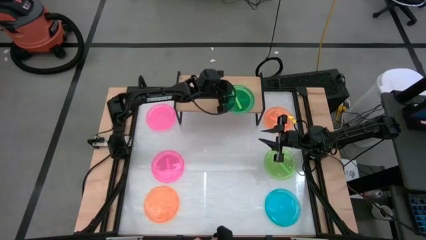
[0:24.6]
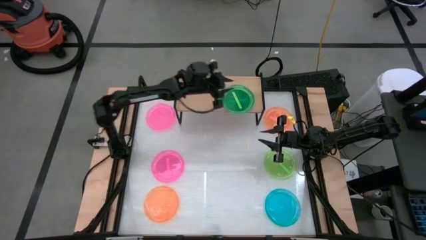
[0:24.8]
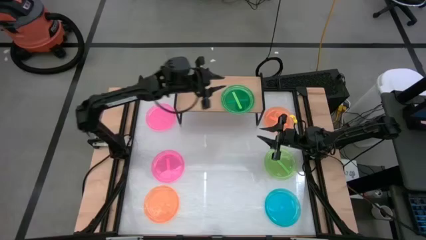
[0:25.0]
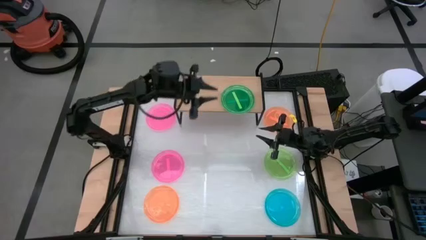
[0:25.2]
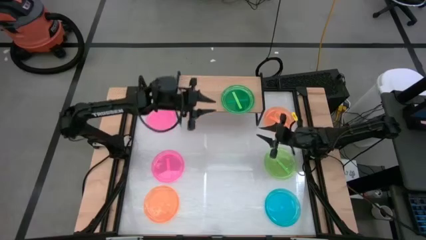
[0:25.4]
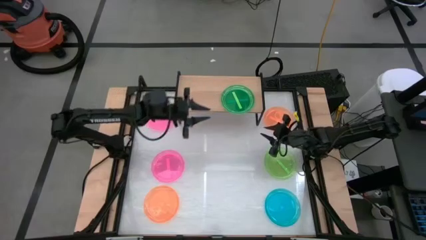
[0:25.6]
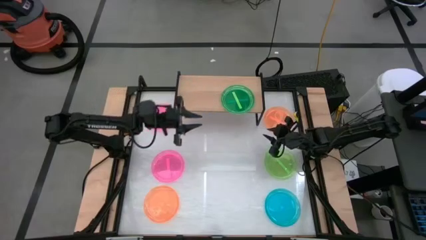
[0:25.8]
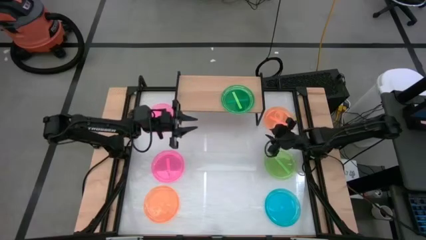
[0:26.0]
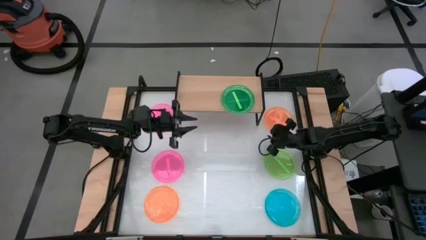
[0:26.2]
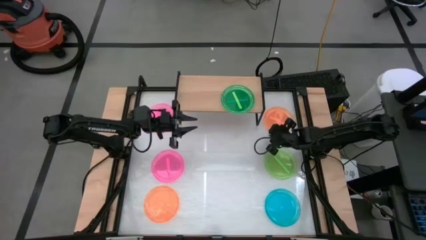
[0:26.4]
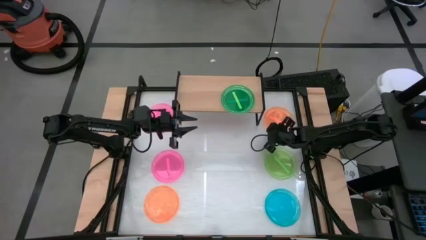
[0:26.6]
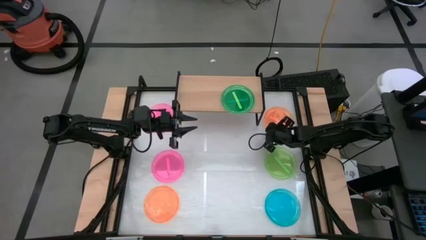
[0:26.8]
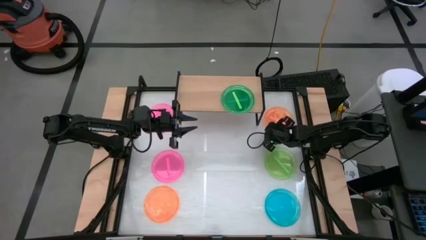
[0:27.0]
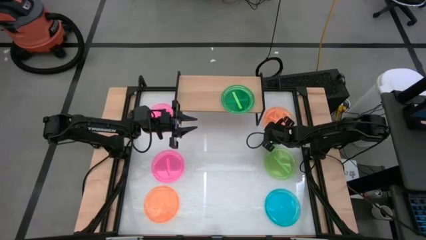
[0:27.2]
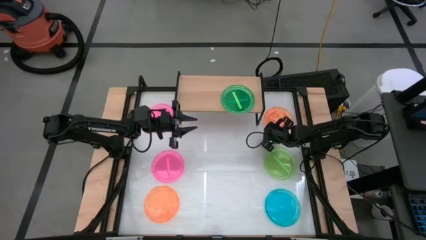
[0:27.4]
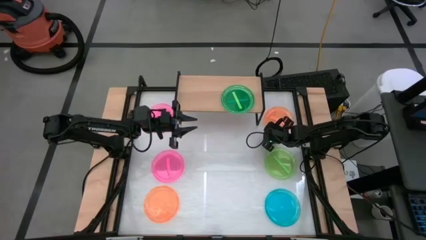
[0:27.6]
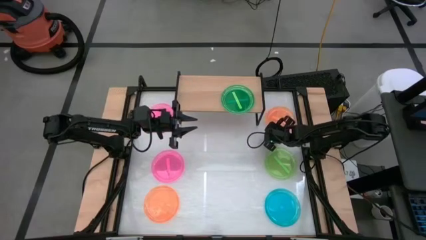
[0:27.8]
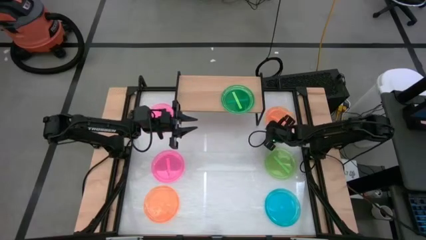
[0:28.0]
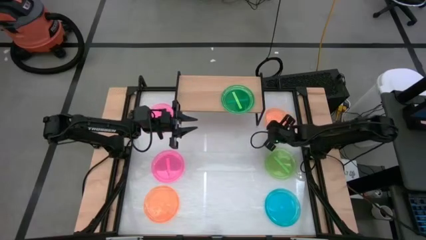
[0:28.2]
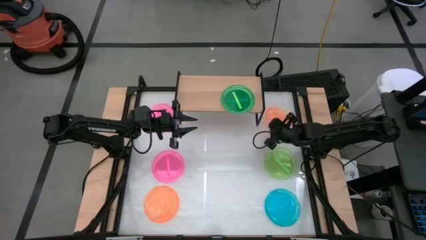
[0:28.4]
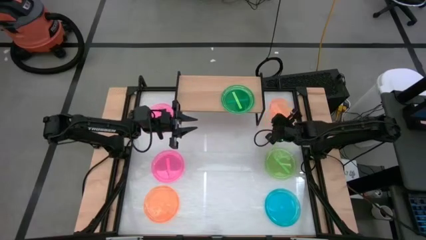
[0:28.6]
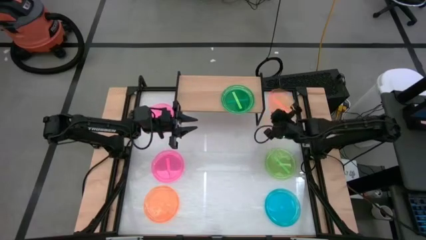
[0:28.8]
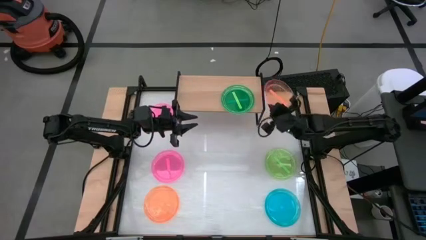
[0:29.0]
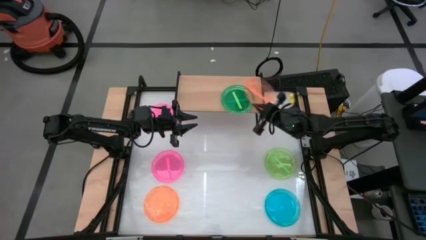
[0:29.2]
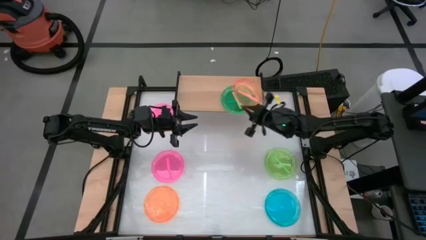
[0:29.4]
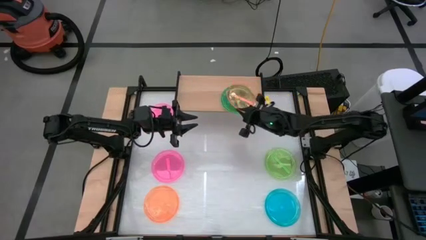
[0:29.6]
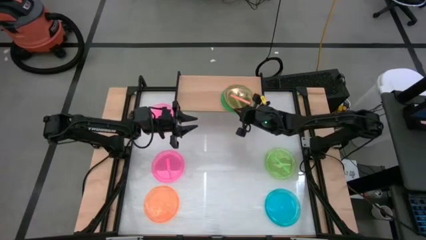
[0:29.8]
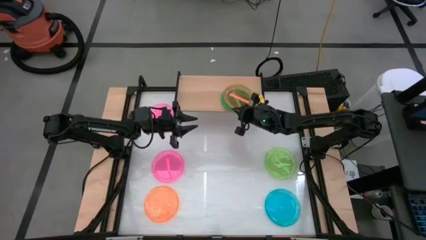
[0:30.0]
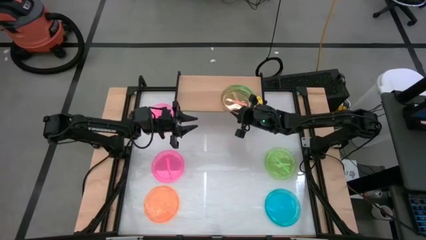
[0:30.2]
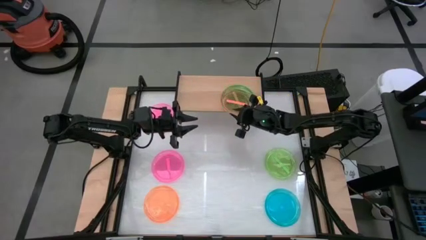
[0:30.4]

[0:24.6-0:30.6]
Task: Place and stack plates onto a shelf
Stack the top orange plate on top of the green plate on the shelf

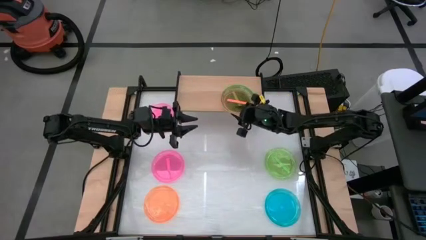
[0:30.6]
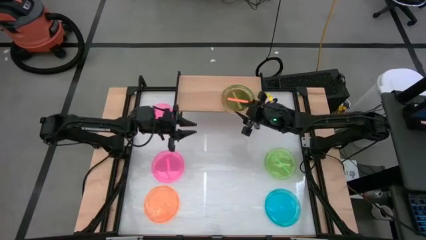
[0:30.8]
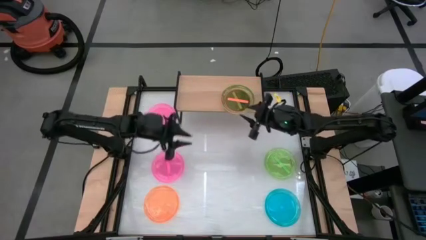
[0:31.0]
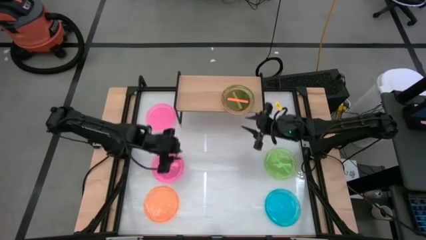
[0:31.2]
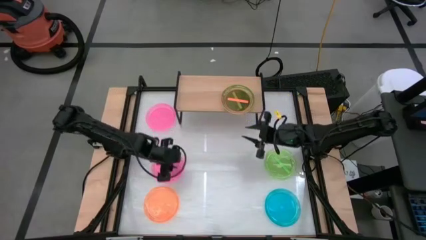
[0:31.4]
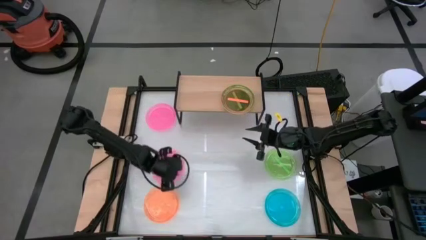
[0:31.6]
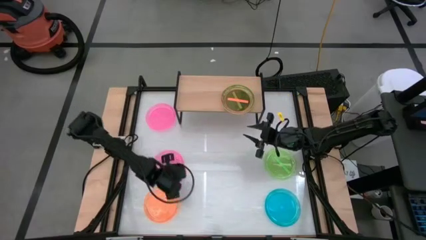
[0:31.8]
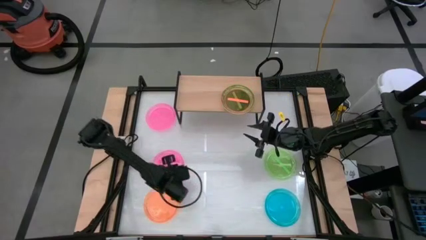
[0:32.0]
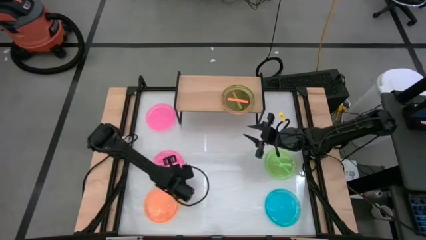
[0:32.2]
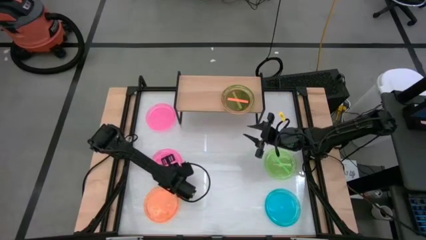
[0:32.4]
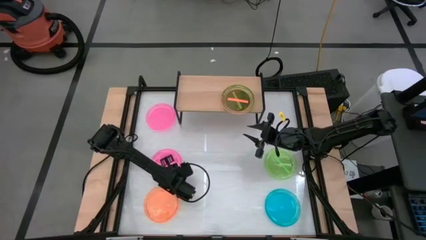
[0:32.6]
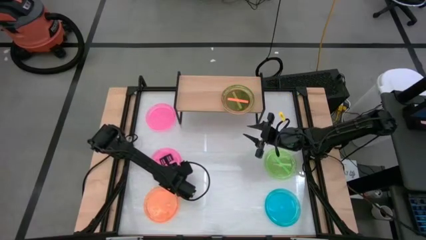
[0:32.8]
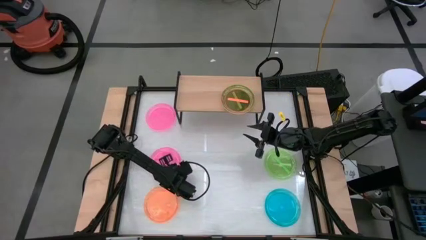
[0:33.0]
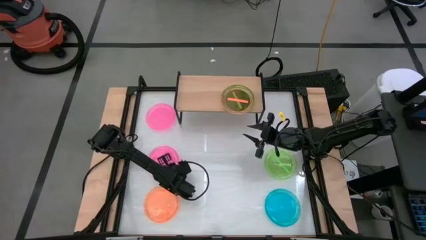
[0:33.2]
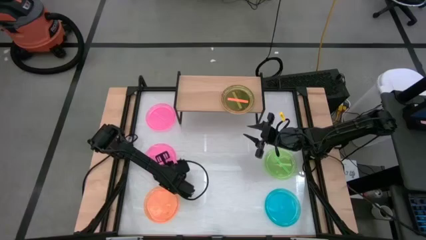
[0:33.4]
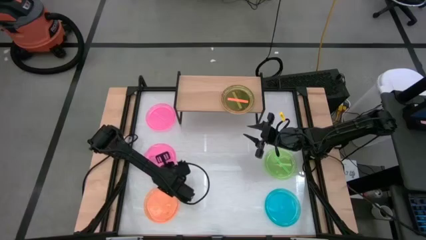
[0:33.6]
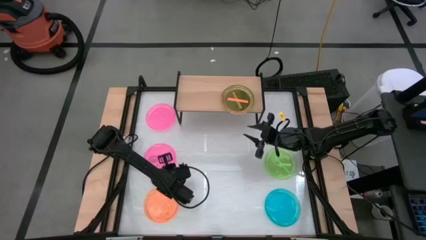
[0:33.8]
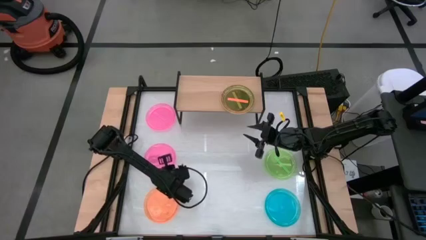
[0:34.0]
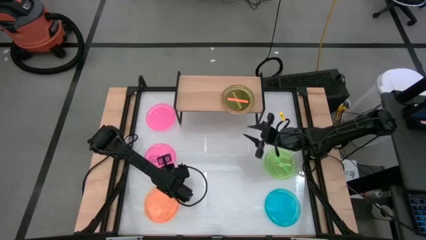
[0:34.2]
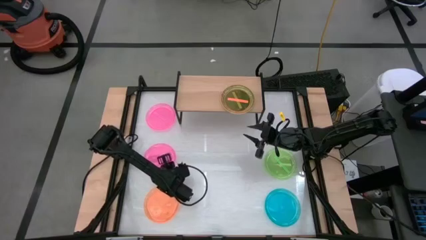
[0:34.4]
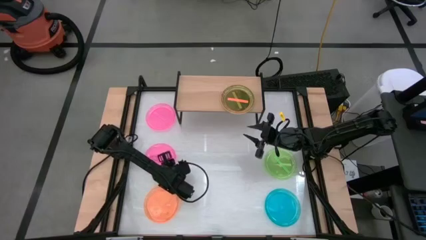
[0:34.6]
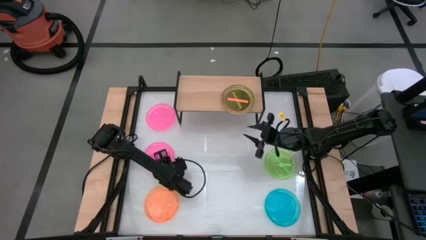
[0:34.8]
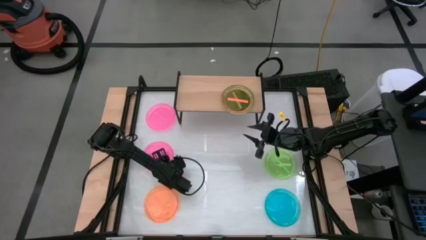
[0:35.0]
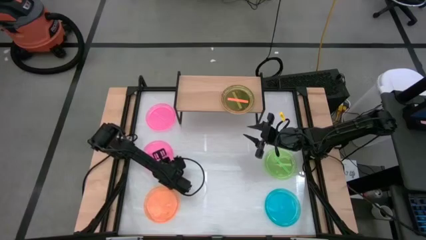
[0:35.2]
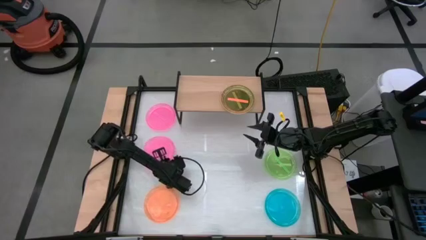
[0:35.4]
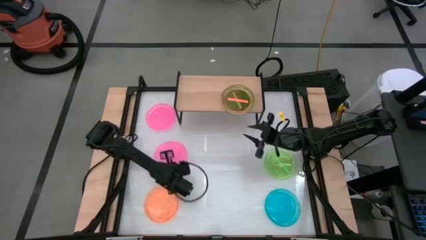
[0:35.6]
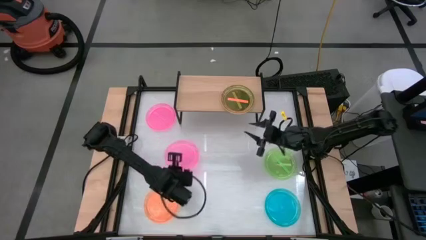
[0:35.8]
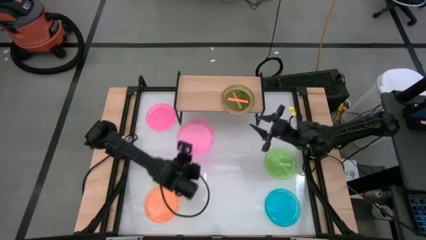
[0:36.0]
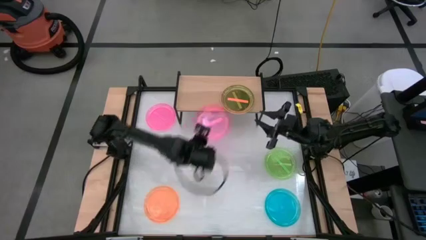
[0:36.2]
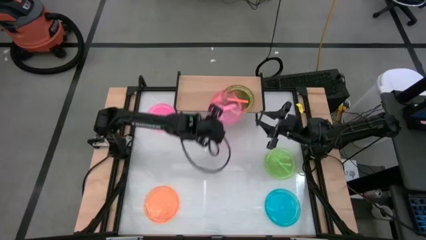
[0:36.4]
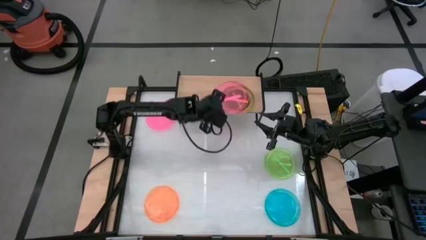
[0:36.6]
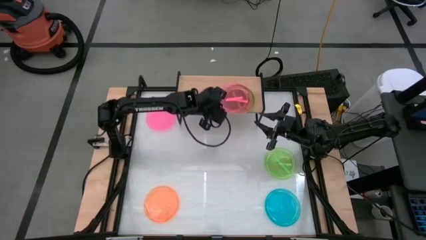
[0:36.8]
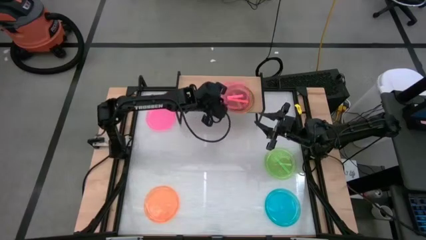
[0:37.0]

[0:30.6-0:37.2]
Stack the bottom pink plate on top of the orange plate on the shelf
